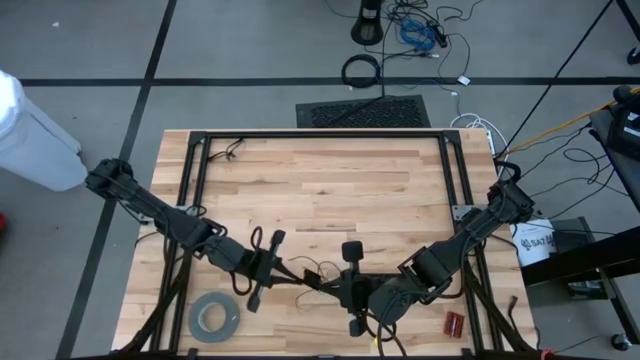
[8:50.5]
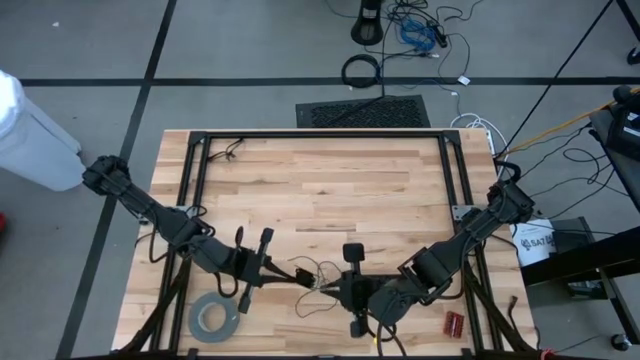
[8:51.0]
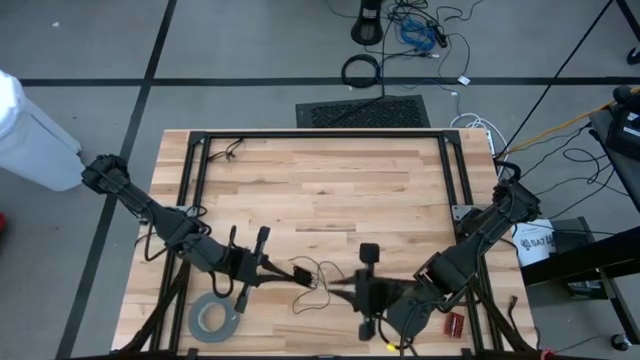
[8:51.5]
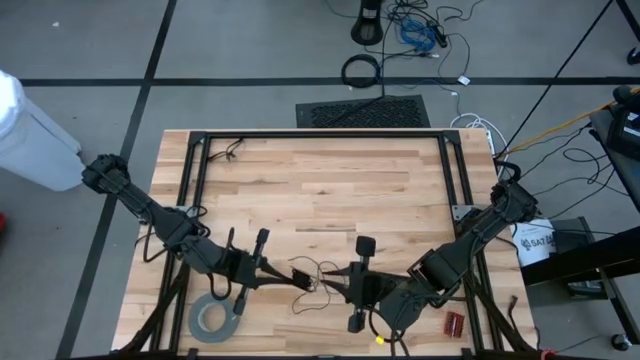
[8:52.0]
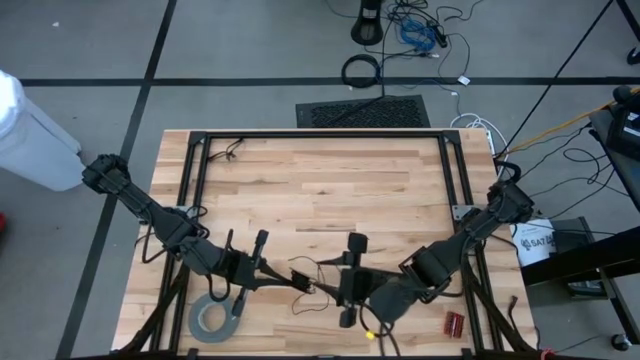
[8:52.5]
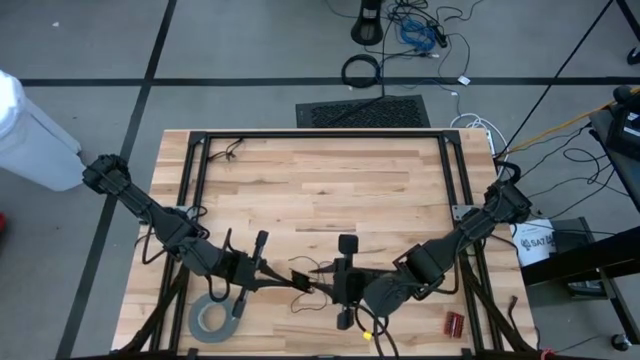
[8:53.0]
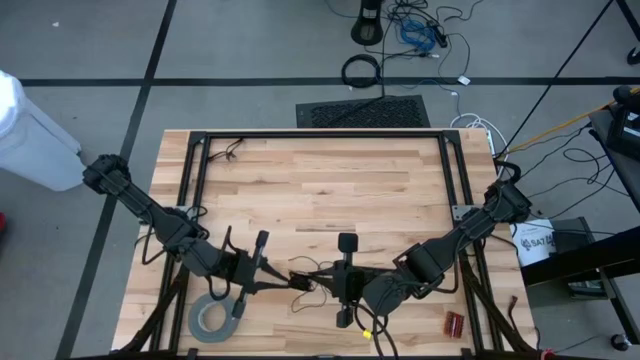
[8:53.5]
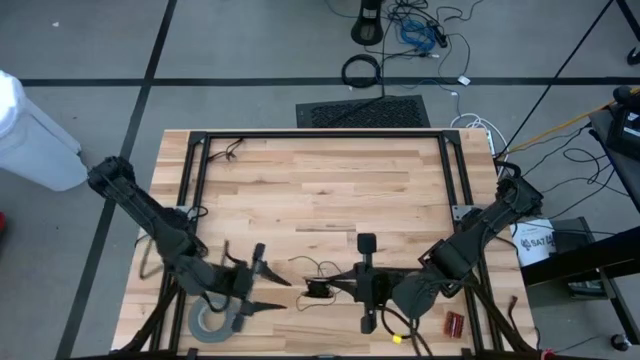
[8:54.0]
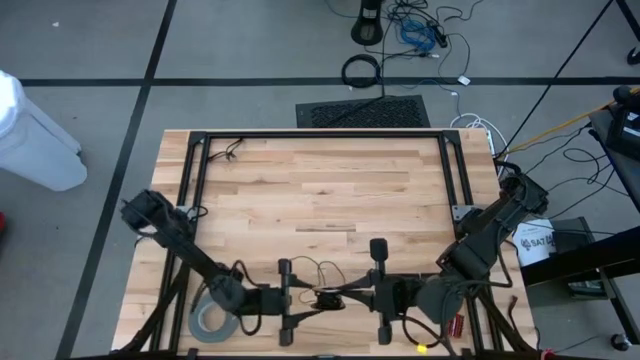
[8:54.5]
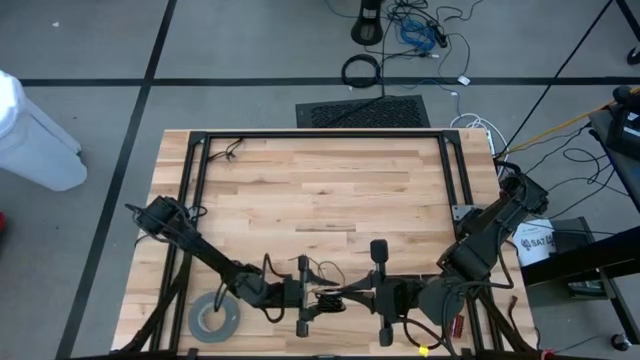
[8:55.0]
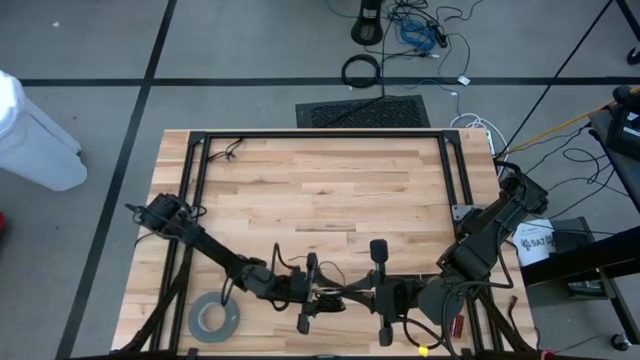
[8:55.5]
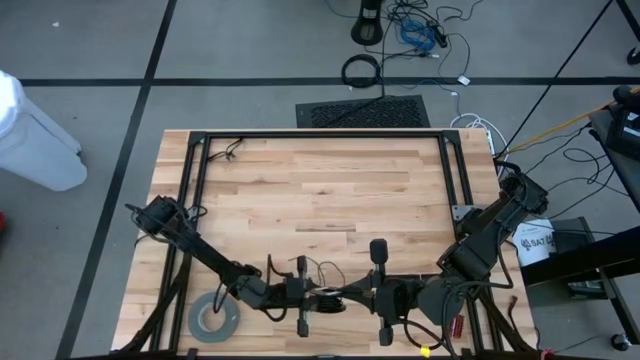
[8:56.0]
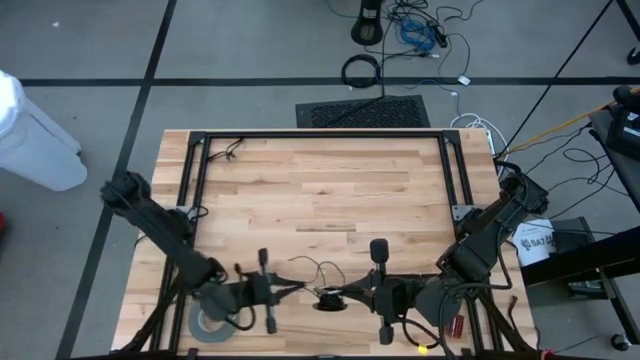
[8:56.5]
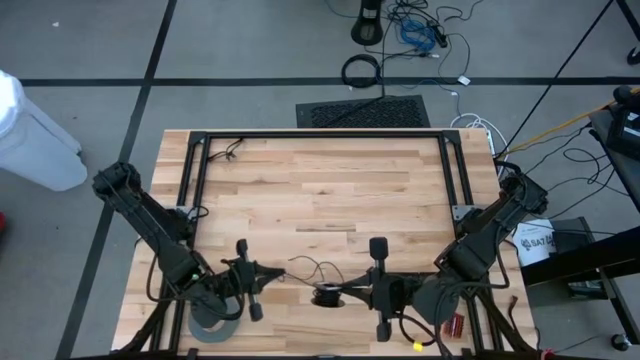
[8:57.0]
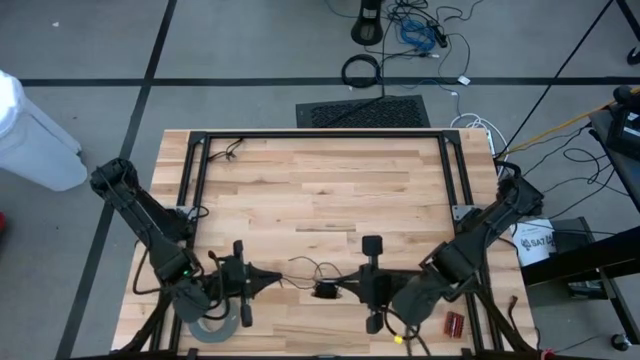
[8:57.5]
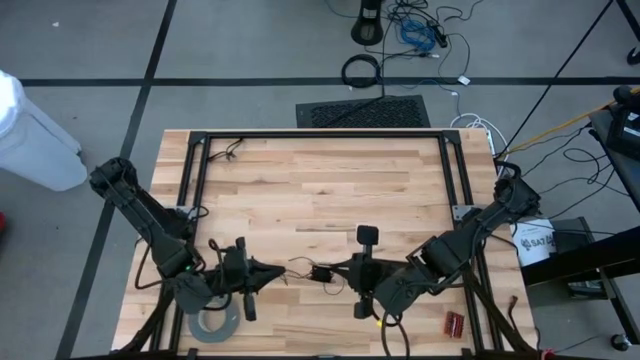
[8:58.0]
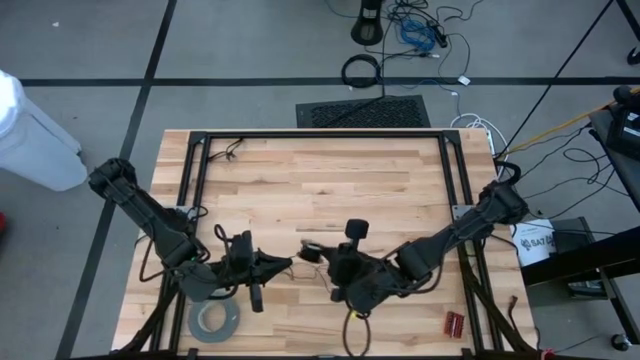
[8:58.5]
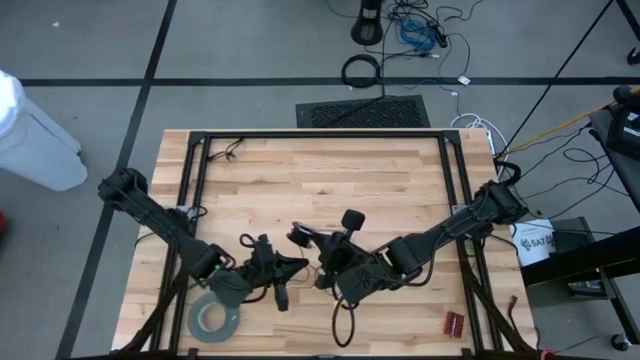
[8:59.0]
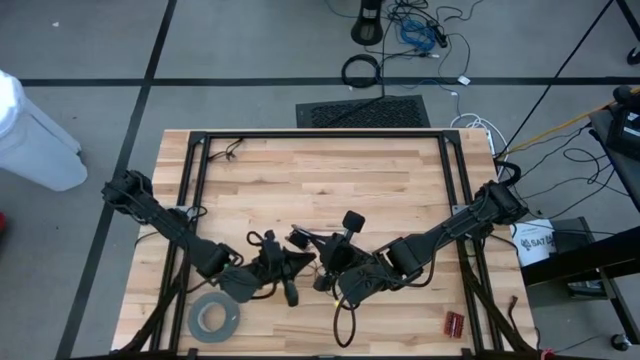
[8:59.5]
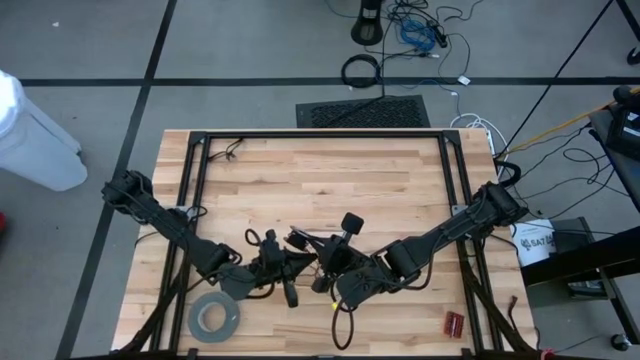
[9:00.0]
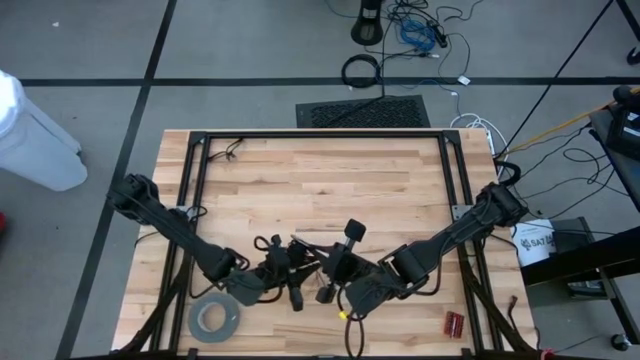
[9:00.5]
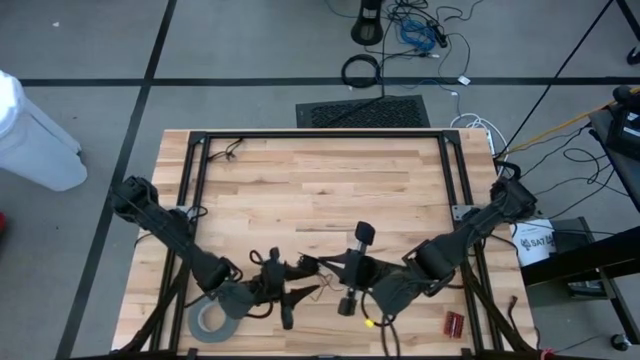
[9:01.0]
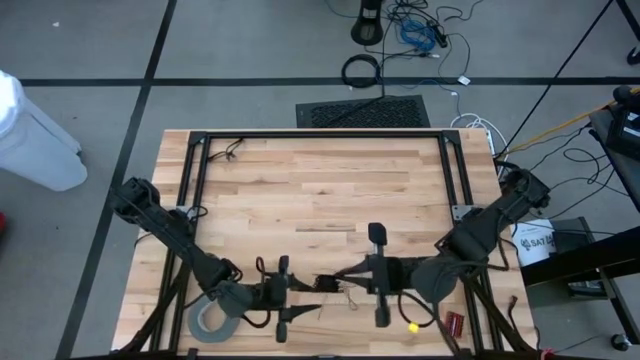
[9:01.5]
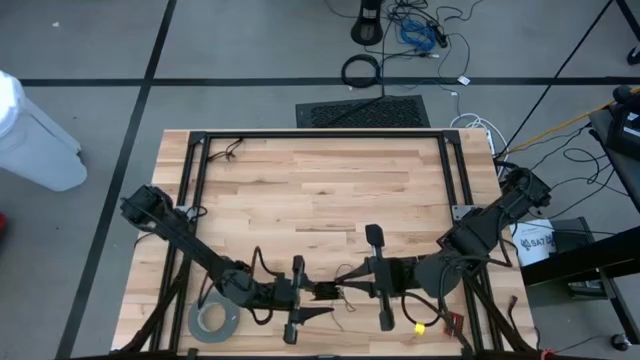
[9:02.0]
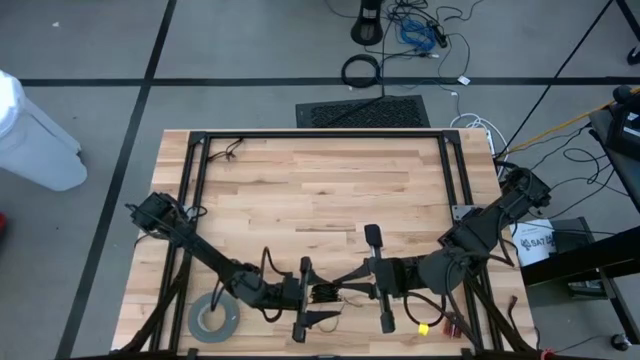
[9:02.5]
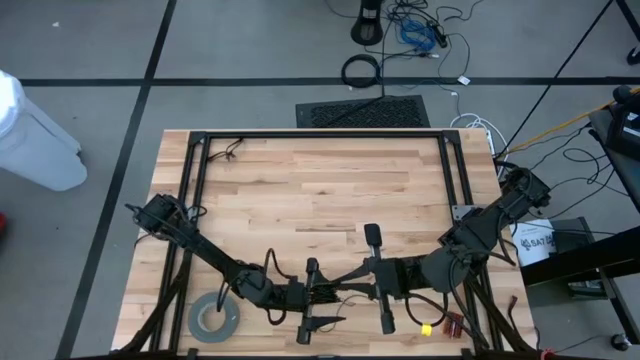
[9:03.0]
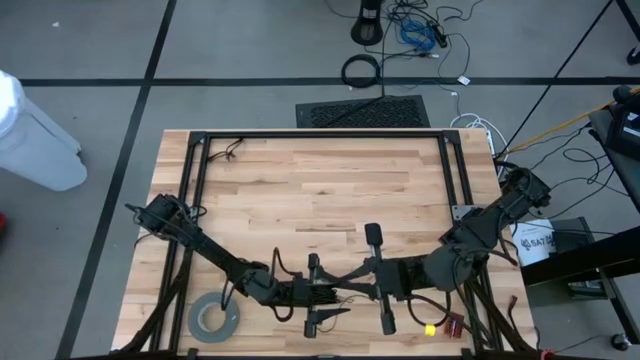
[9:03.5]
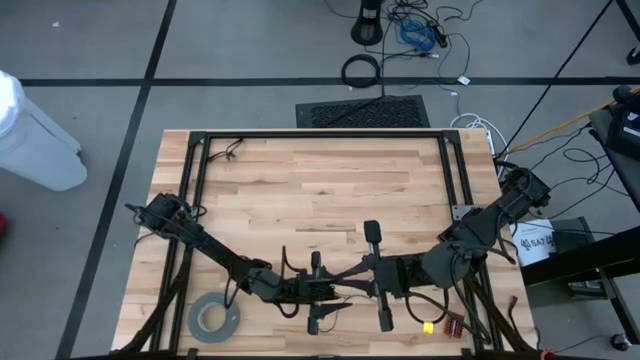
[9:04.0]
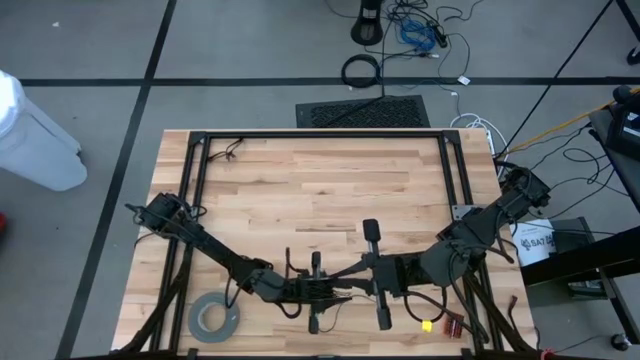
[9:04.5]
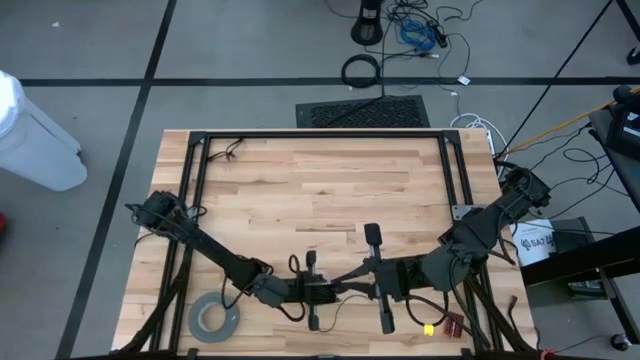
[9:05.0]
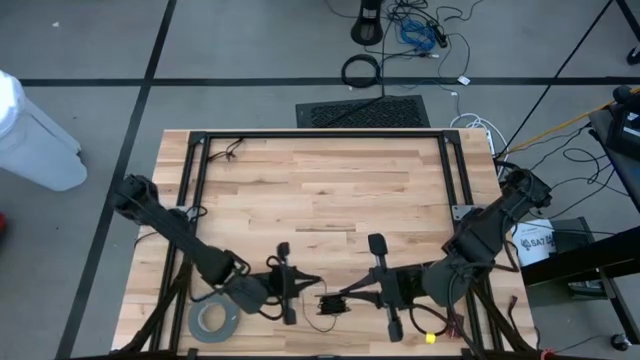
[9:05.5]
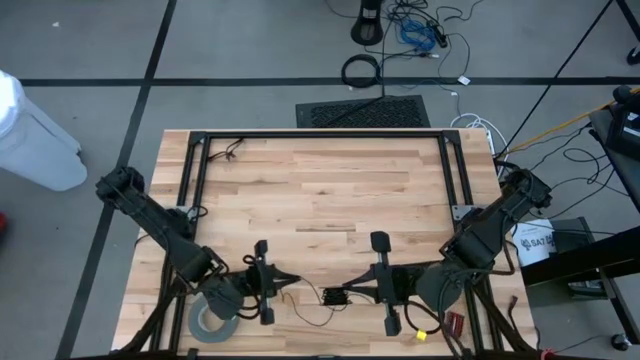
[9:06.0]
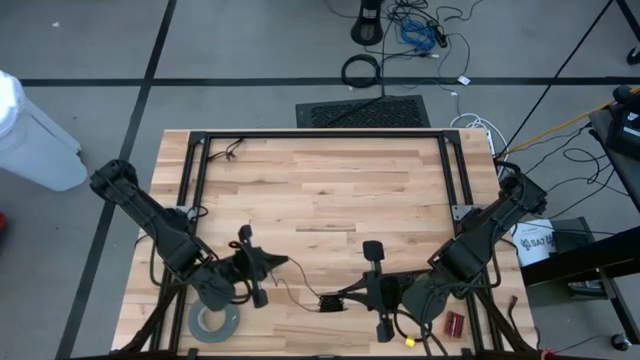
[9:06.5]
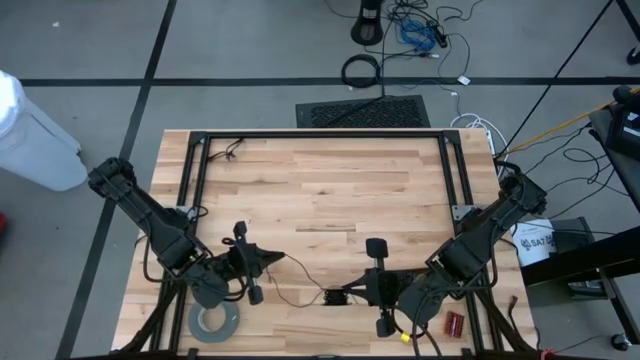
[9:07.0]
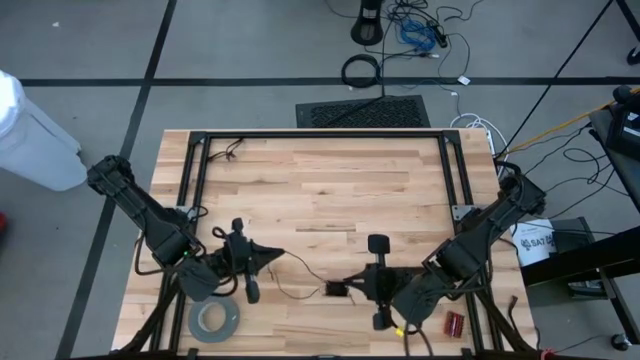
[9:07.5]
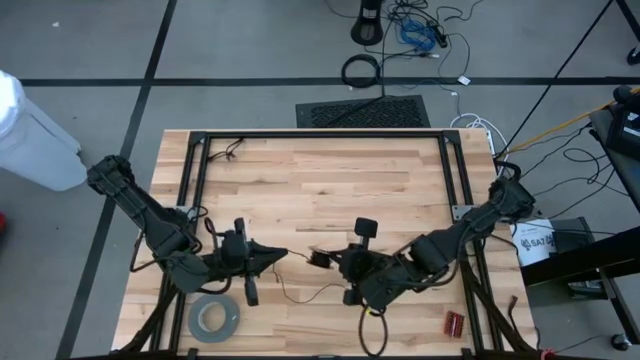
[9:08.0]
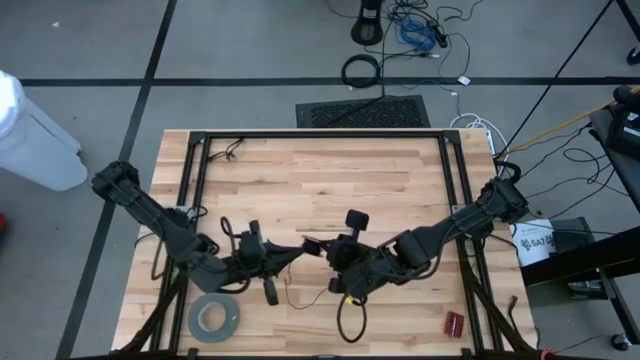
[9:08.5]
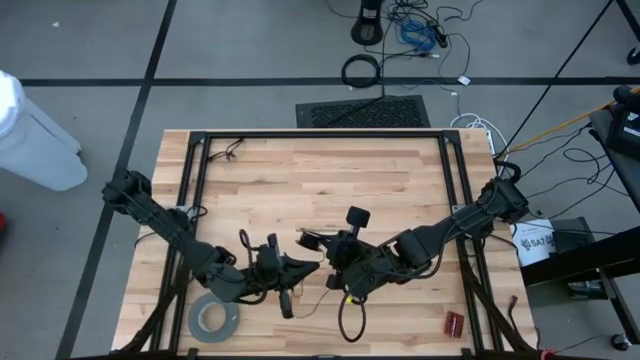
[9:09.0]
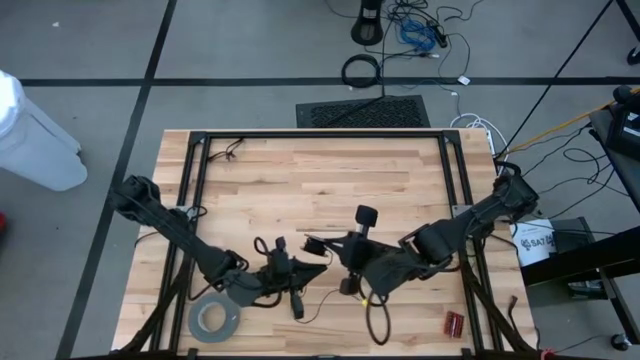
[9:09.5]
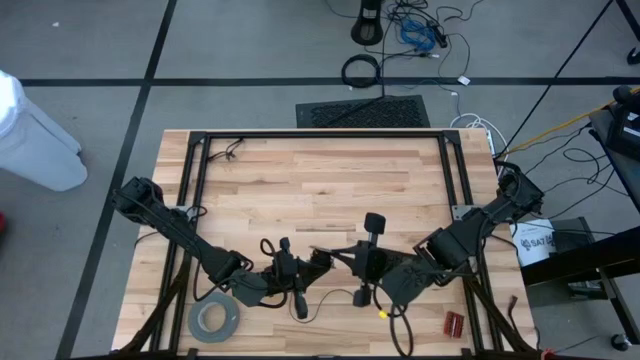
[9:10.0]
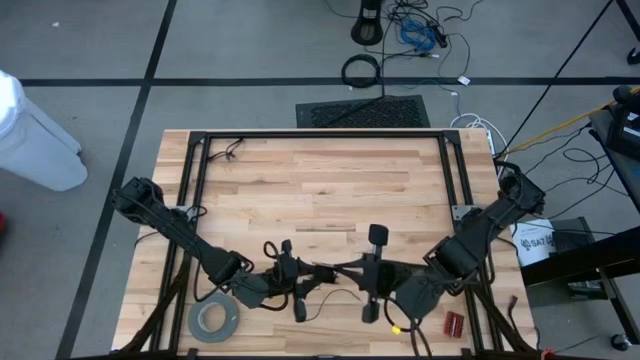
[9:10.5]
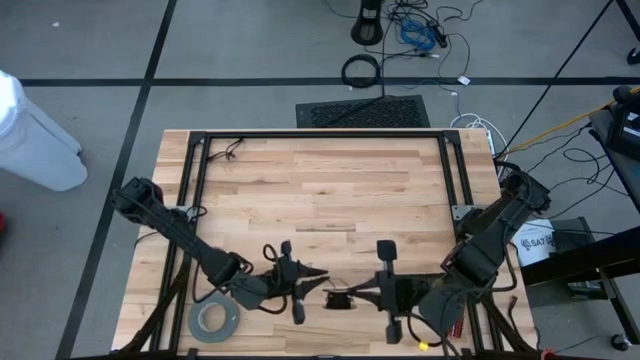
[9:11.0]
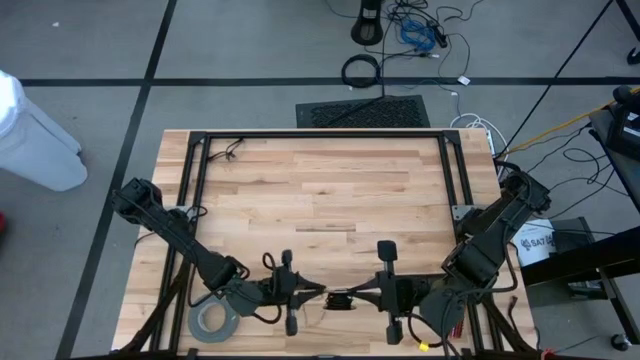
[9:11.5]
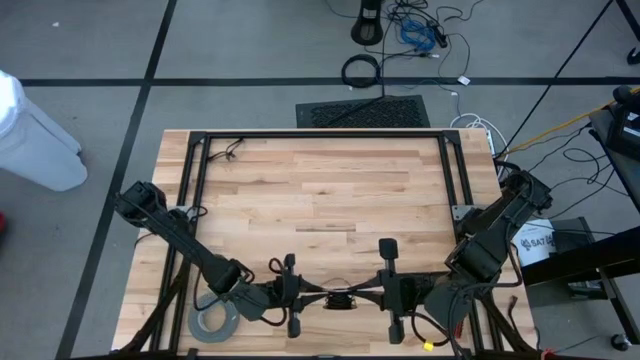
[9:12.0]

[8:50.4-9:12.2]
Task: Coil cords
Coil the black wire onto the spool
